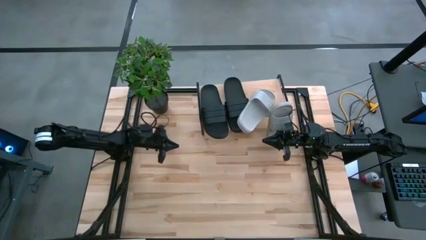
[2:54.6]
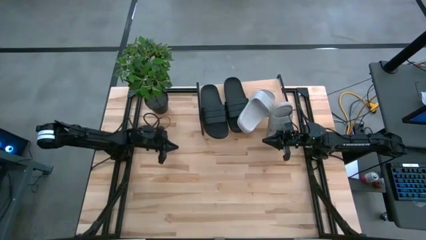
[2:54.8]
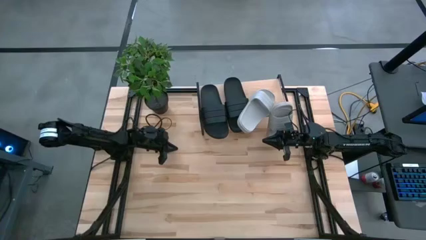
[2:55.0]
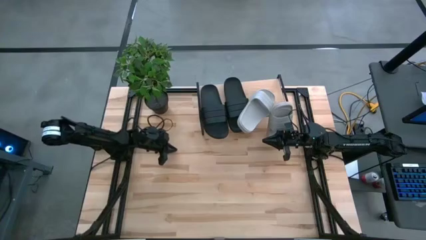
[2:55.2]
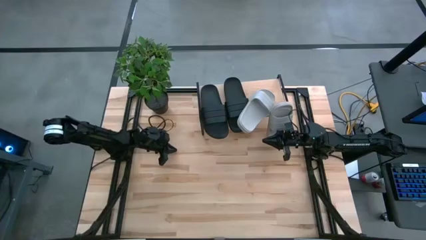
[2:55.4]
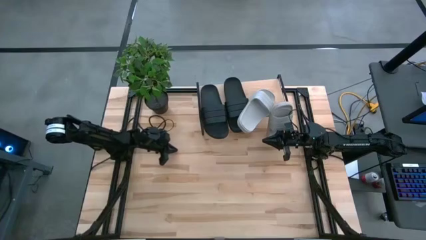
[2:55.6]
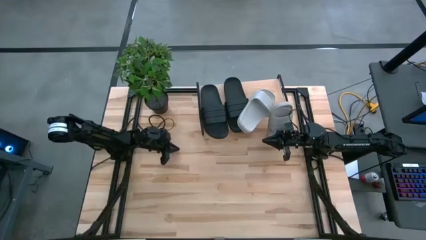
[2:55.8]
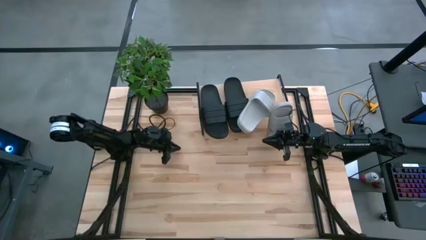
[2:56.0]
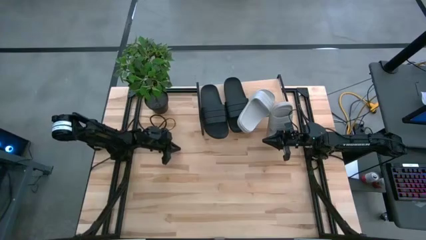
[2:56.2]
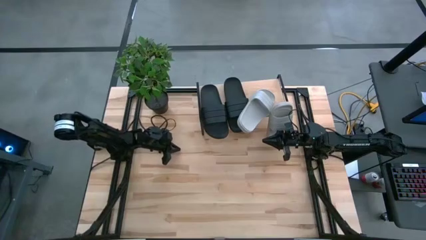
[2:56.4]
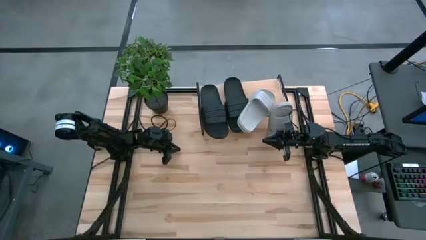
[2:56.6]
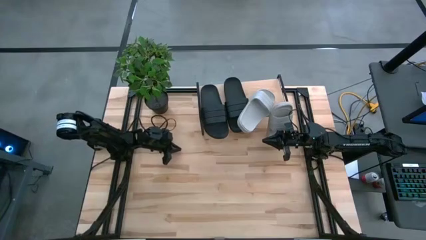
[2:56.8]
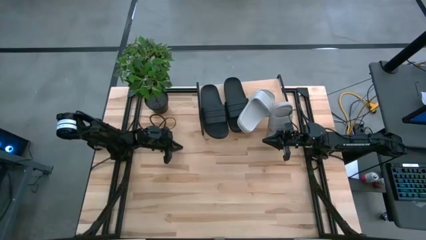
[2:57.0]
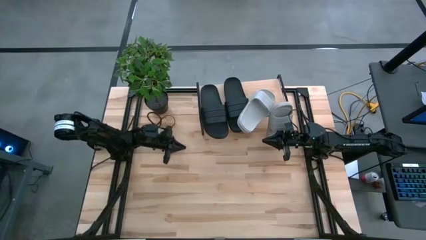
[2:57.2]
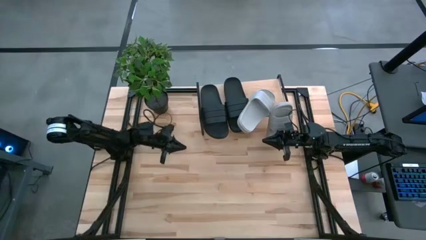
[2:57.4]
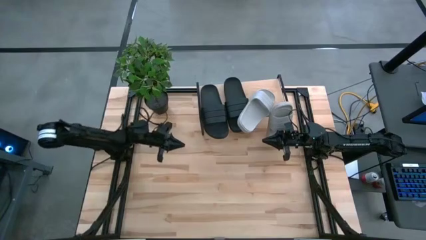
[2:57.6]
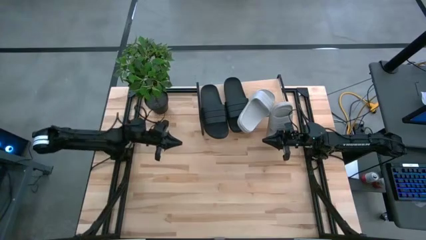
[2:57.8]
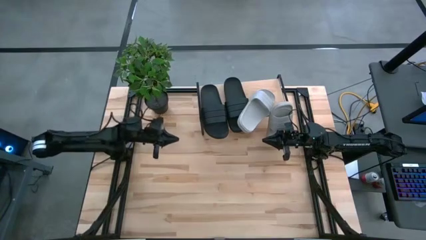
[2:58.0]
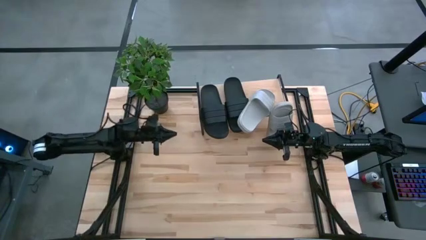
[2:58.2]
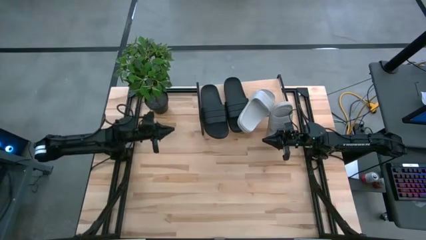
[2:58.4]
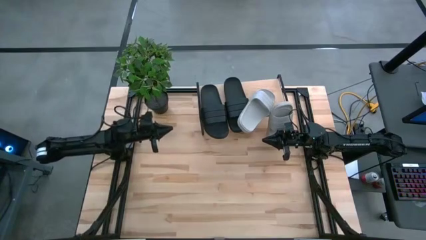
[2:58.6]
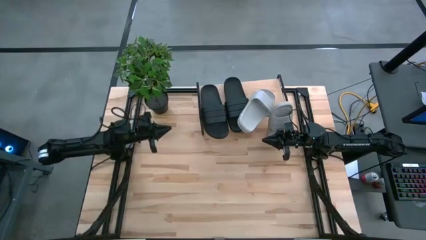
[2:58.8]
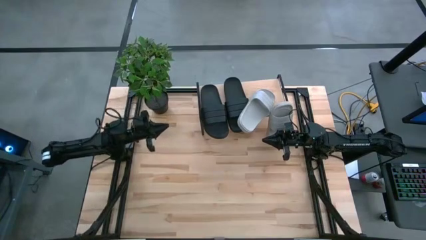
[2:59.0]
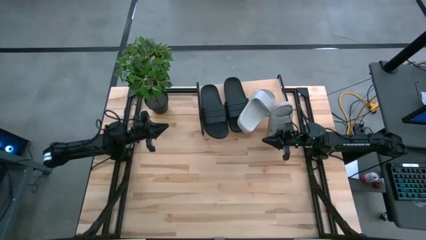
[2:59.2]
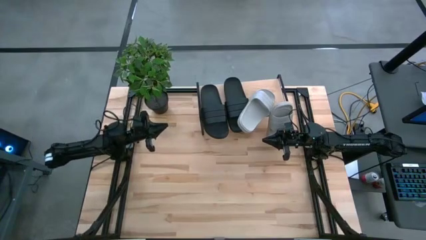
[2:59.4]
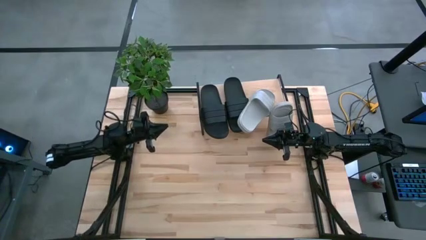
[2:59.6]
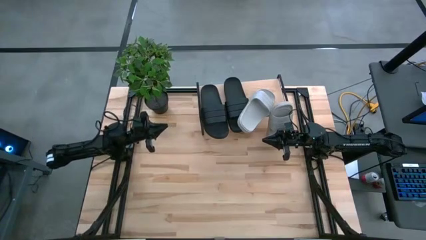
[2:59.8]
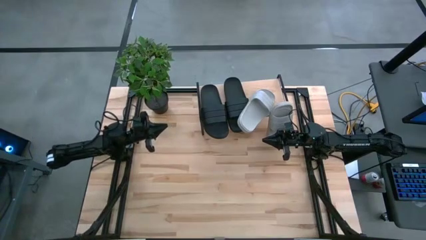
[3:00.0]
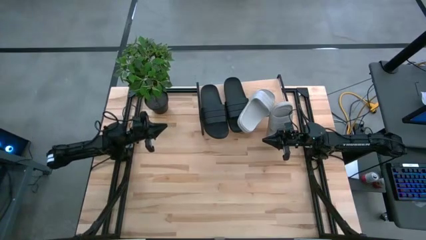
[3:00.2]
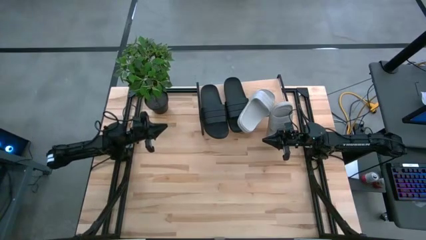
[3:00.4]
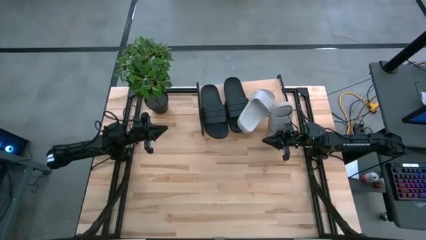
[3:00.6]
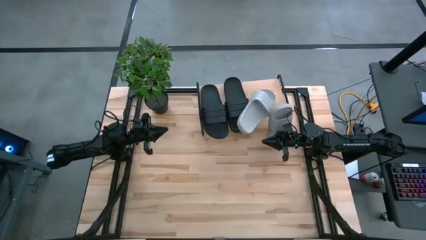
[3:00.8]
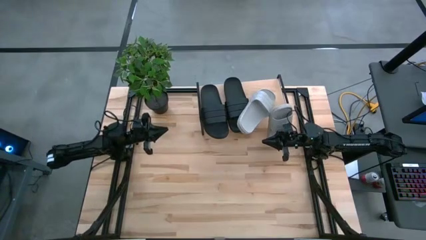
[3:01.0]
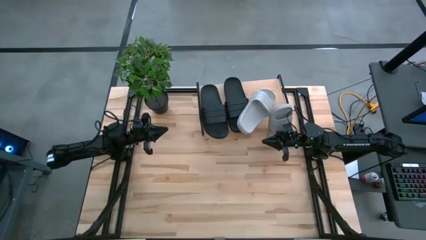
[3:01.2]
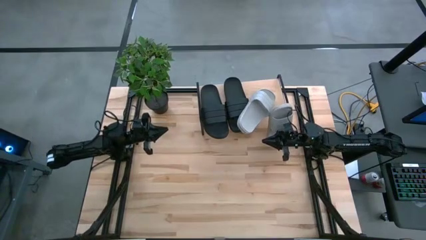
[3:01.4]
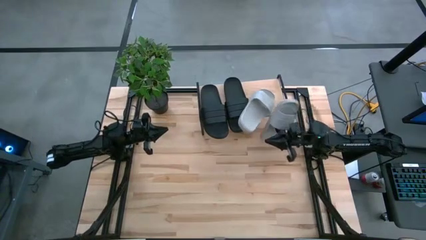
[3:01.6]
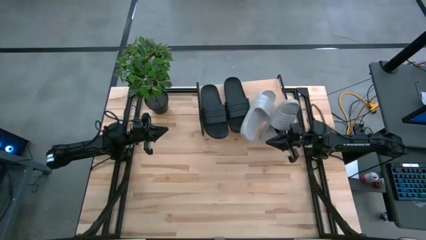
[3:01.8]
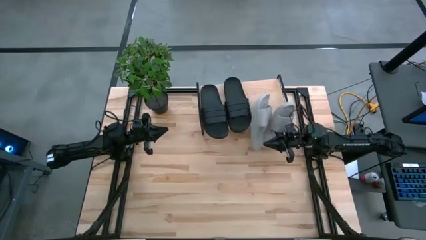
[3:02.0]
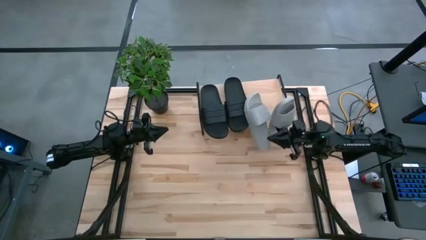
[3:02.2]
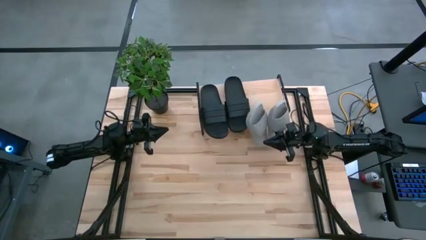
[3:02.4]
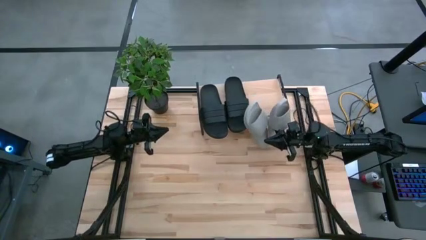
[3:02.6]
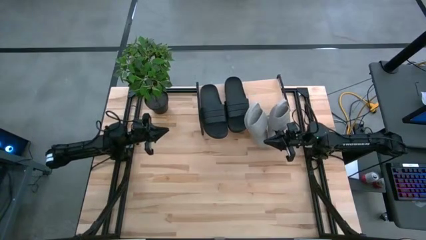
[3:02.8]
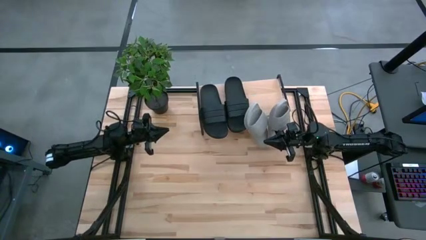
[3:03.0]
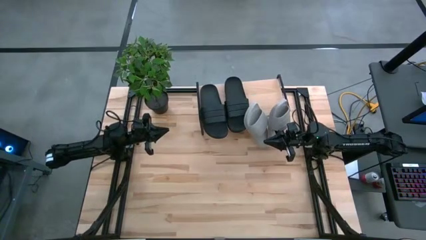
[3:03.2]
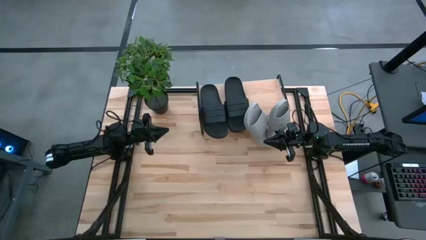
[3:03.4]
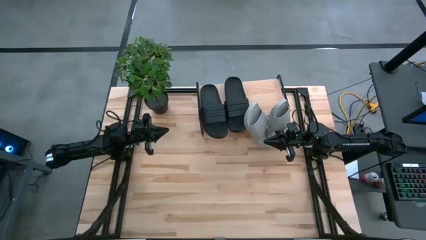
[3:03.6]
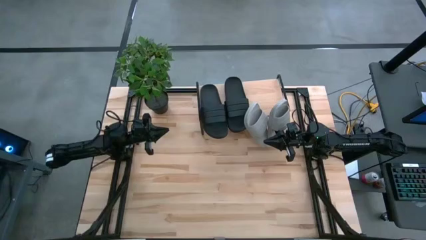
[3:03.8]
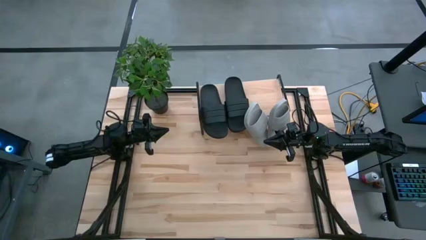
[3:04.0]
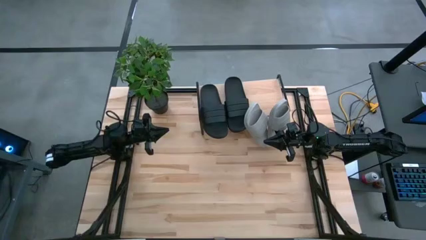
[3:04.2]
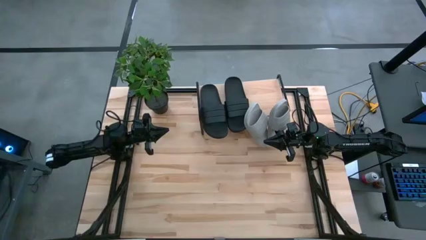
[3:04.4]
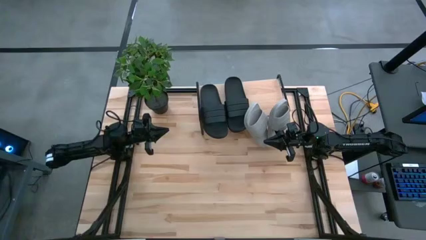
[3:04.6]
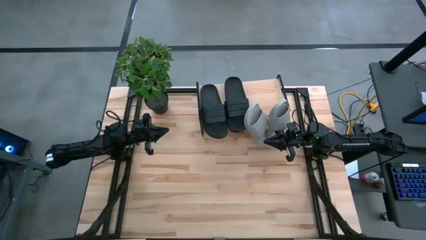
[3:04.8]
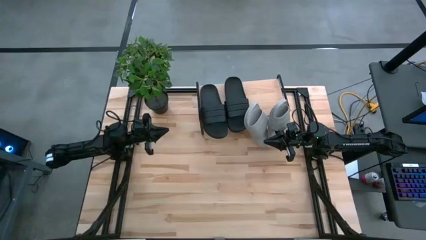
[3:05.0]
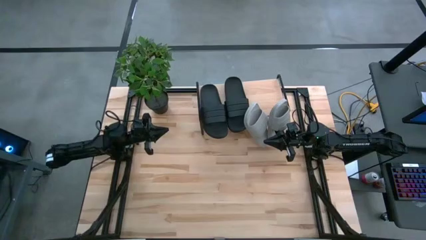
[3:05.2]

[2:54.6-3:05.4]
Task: Pick and place slides into the shelf
Return to Home Position

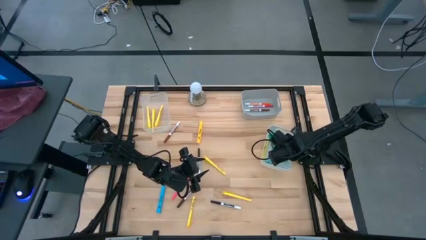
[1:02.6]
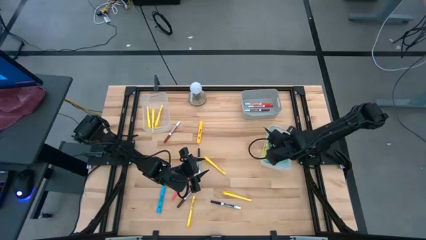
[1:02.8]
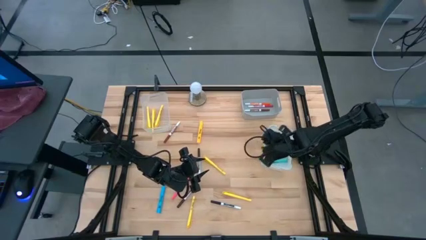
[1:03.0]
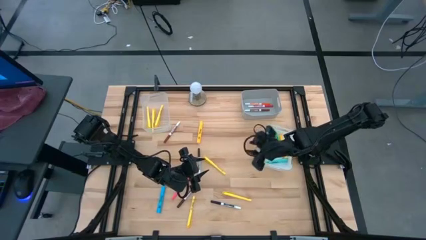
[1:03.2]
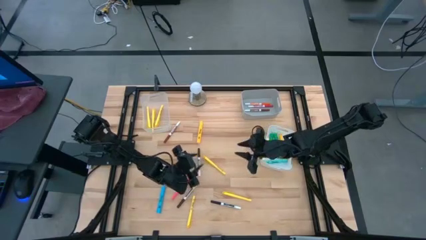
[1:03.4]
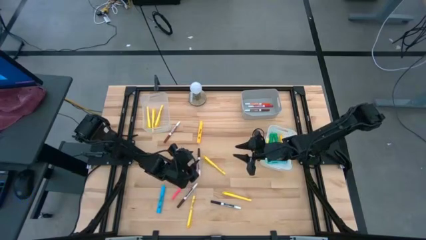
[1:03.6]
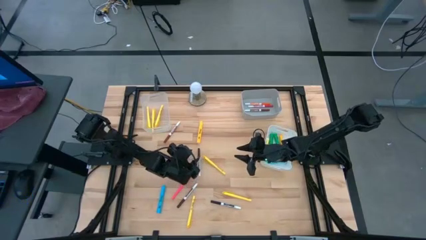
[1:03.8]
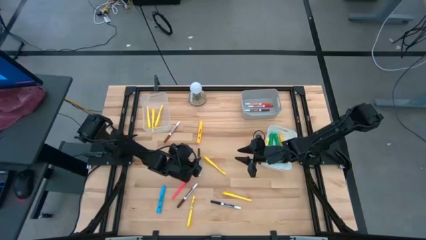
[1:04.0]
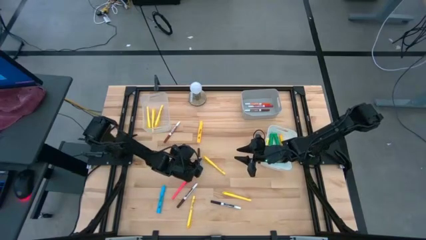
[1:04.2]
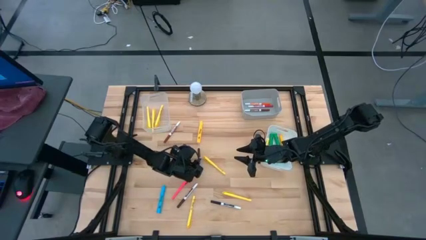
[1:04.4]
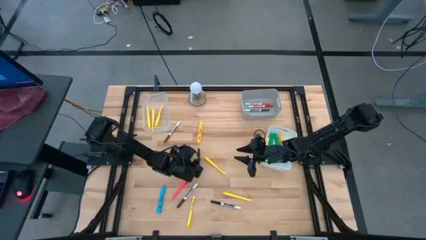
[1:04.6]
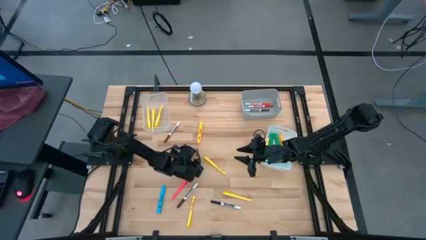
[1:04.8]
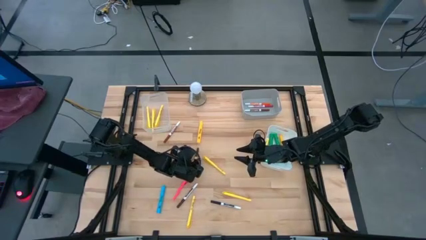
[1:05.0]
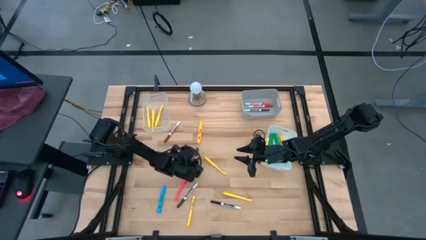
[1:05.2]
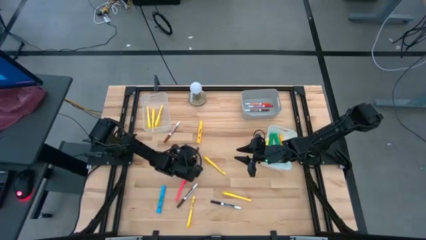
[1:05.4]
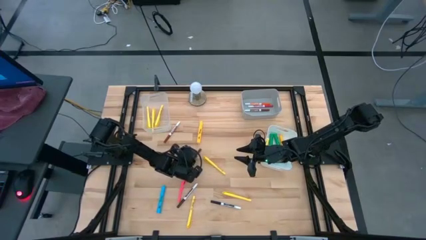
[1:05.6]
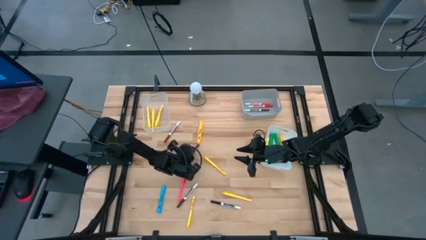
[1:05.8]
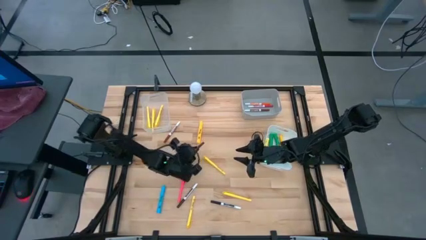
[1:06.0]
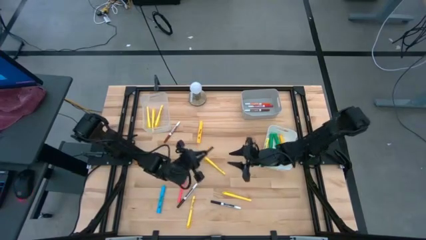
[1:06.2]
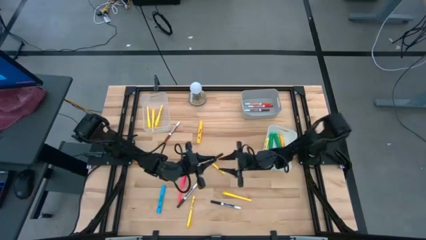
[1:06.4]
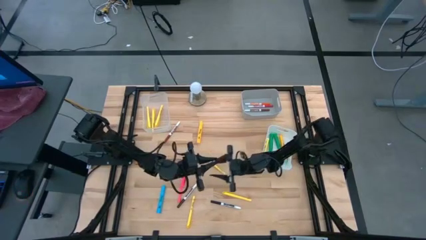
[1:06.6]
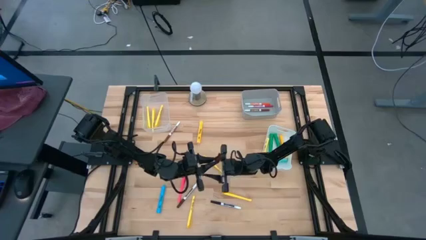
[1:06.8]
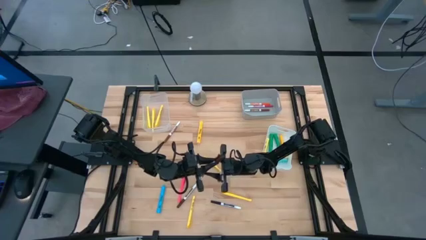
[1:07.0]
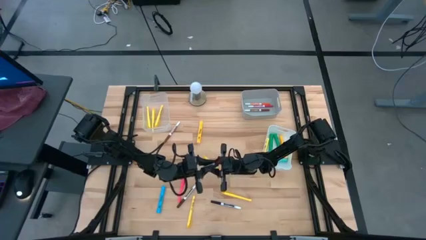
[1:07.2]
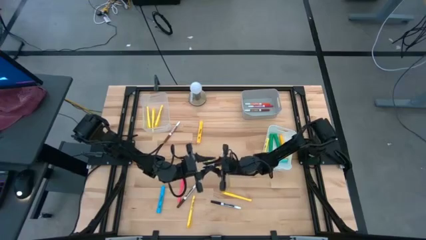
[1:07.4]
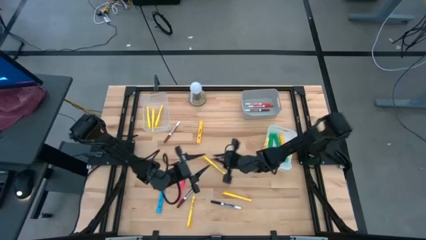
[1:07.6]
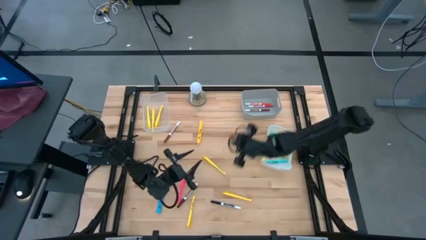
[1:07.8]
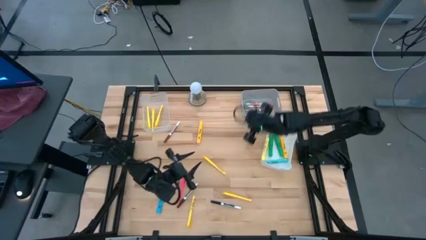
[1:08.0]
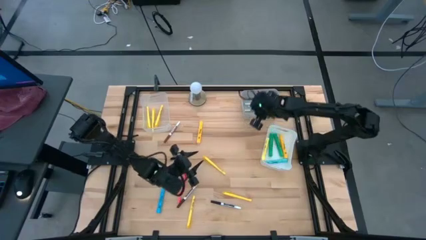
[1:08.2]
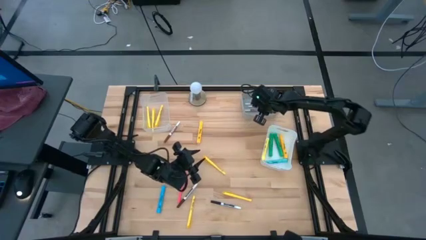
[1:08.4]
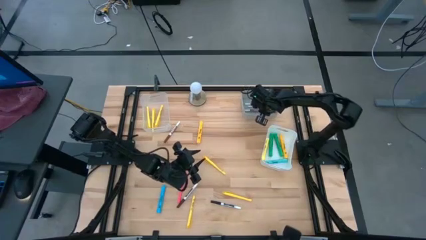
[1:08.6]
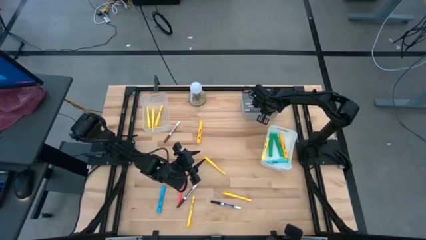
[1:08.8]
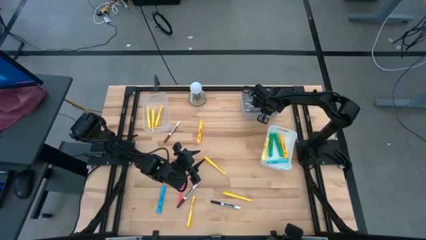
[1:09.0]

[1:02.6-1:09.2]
Task: Pick & Place Markers
Put the top dark brown marker pen into the gray bin
